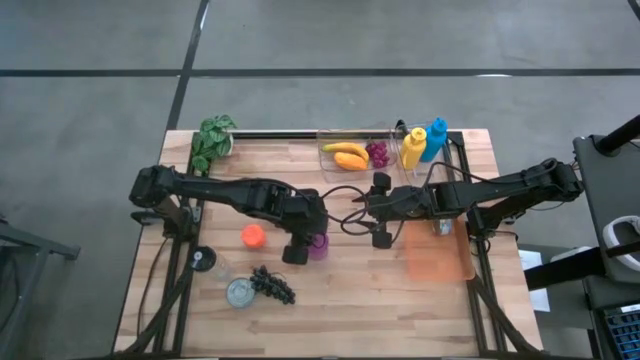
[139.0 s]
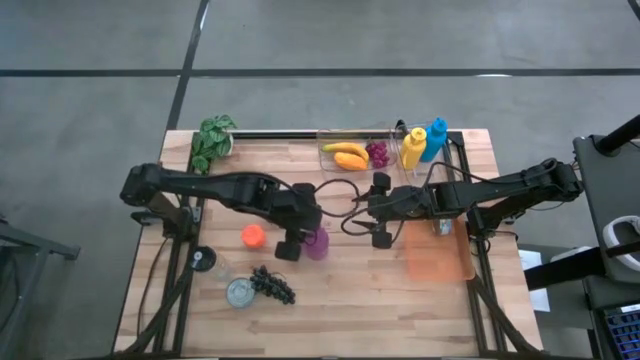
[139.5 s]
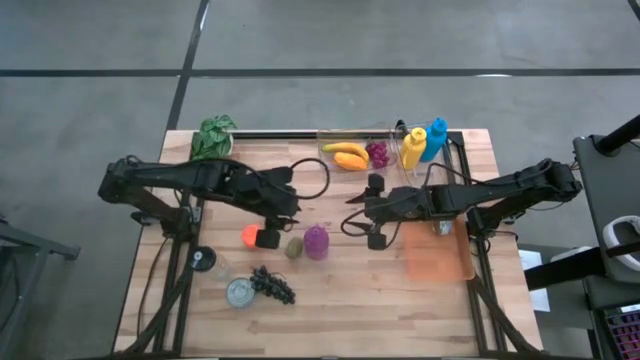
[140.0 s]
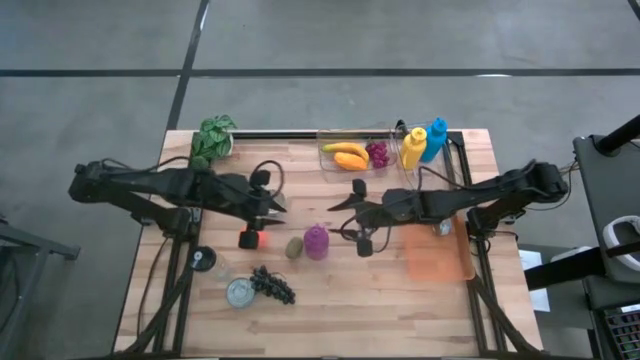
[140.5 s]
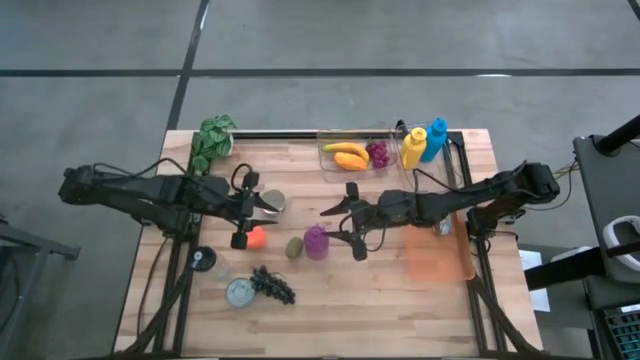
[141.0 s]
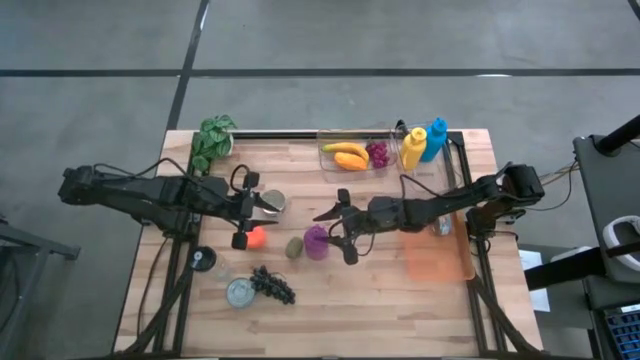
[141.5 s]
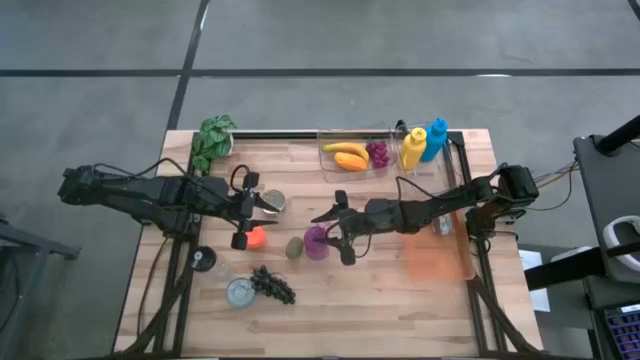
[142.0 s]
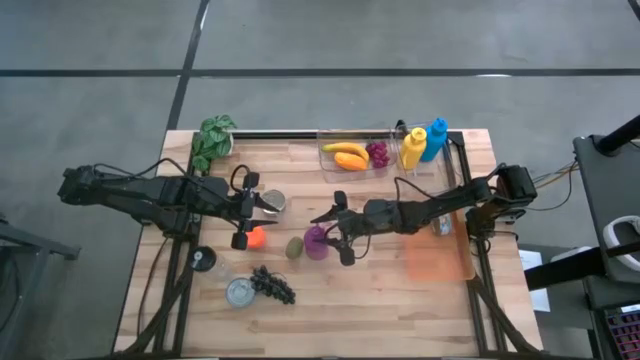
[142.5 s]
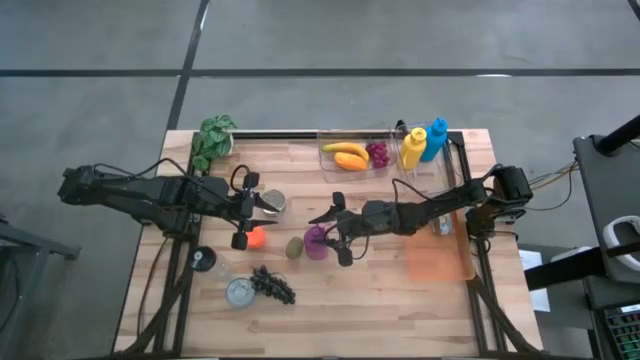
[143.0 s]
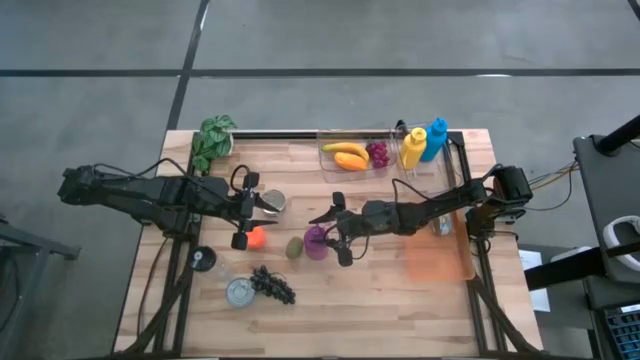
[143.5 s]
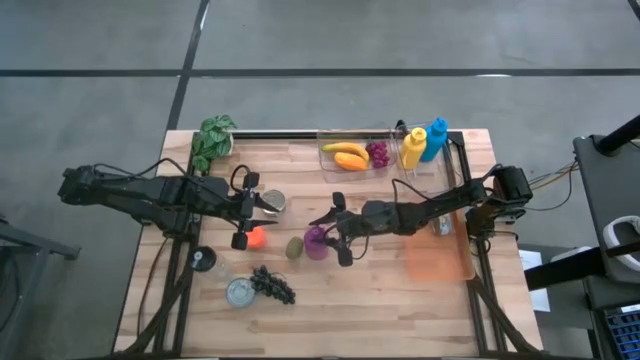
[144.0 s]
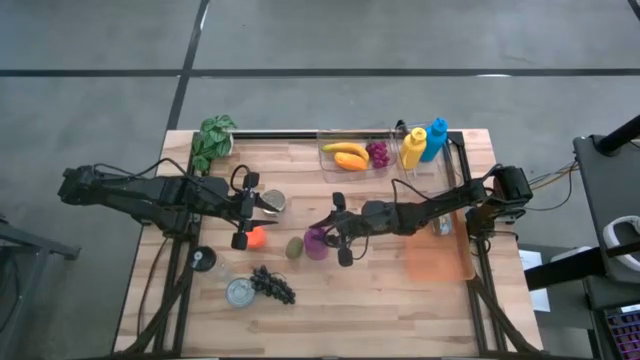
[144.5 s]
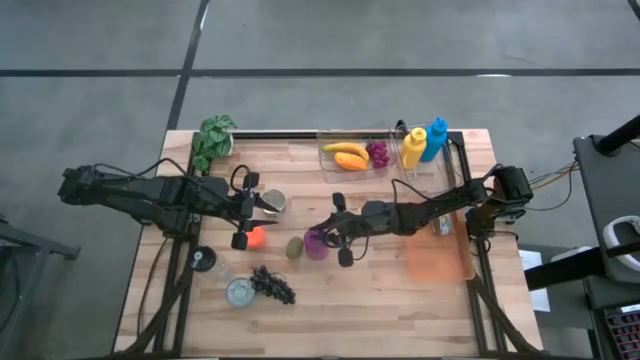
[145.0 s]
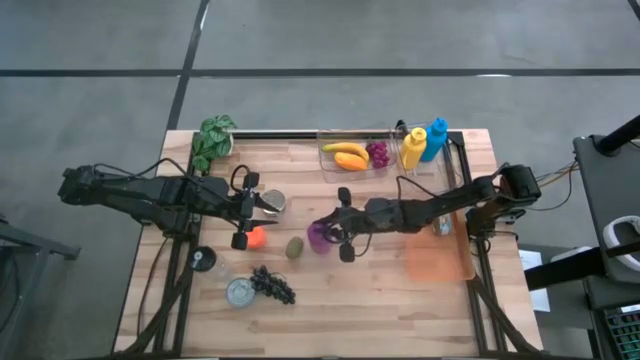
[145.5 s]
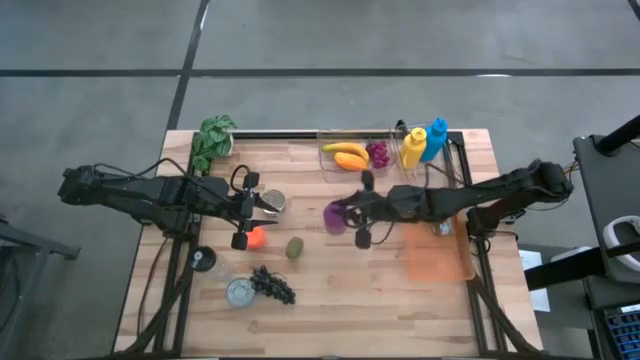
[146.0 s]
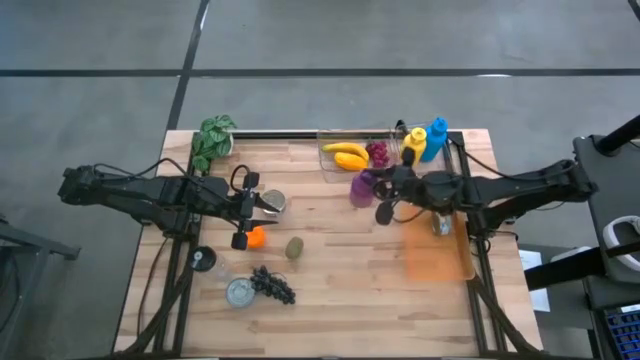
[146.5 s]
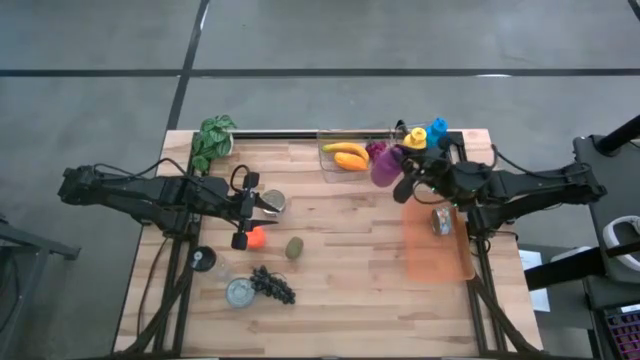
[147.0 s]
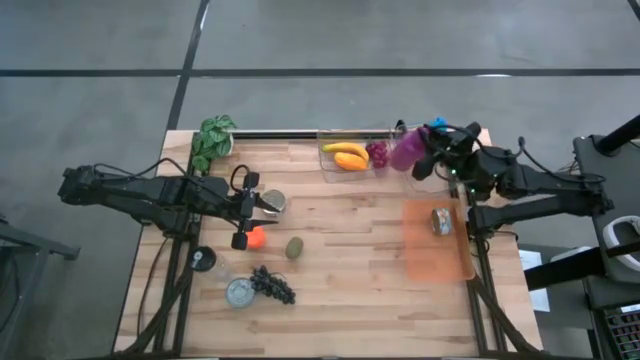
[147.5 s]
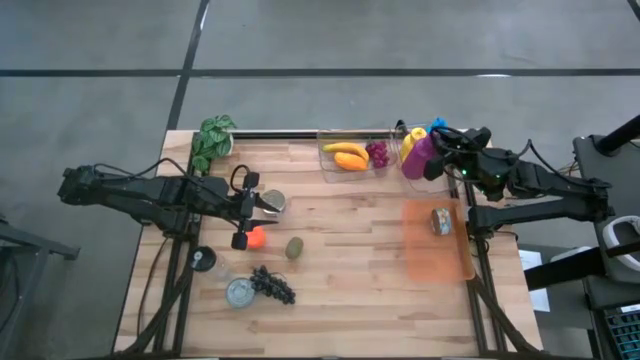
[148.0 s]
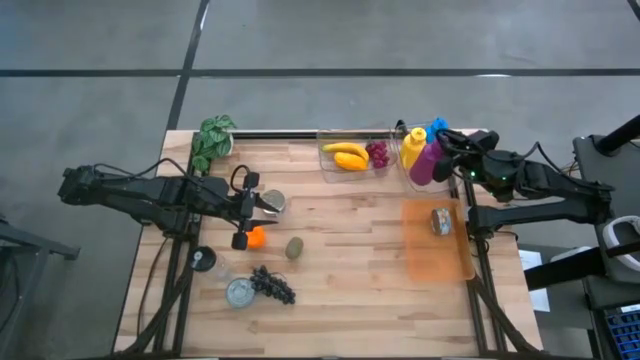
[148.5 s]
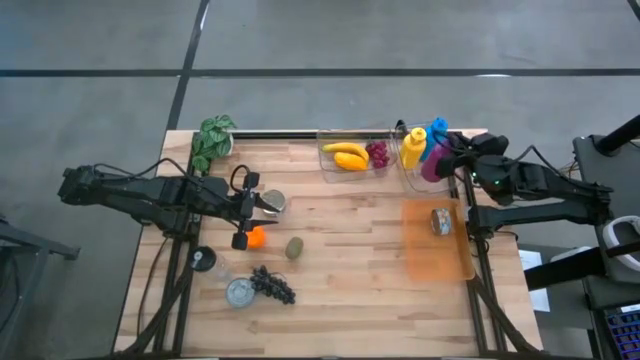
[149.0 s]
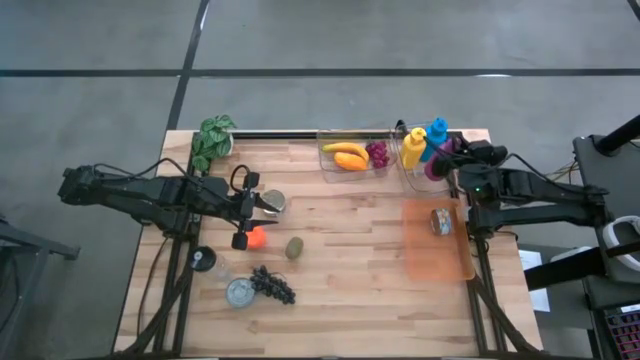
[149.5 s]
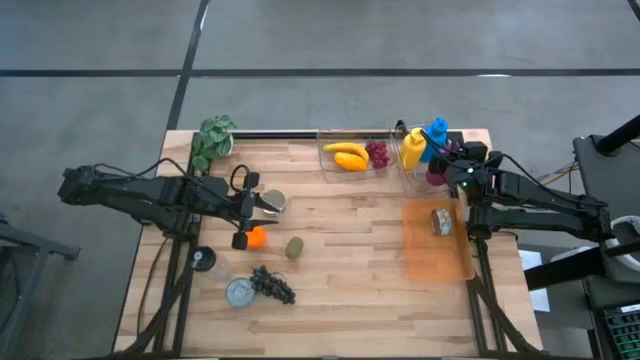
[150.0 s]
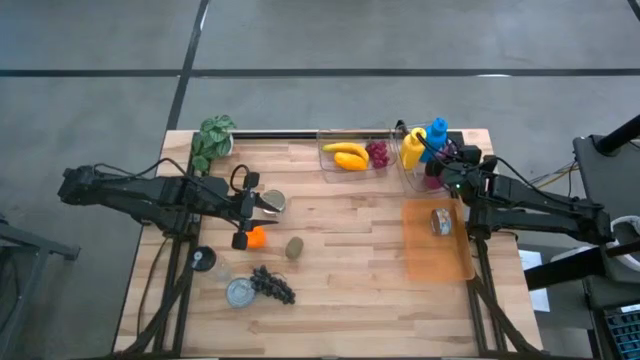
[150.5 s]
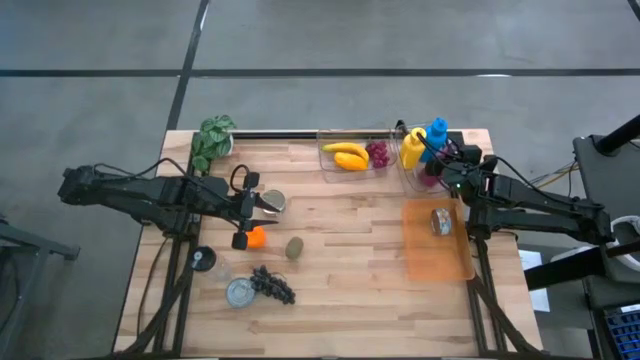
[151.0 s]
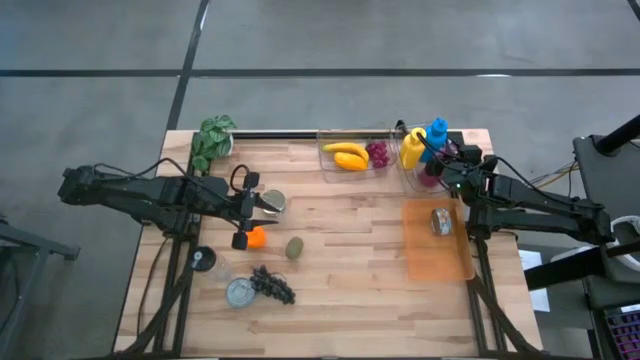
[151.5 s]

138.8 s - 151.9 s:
Task: Pick & Place Food Item
Put the violet water bottle into the right transparent bin

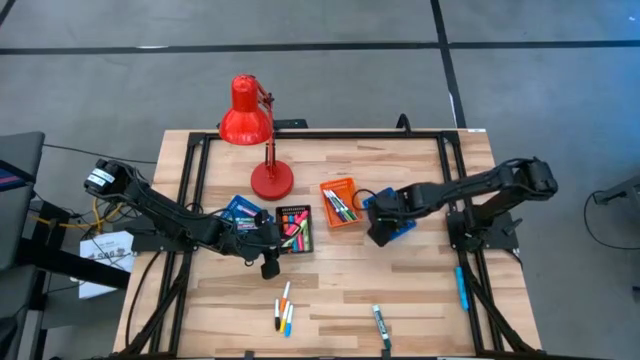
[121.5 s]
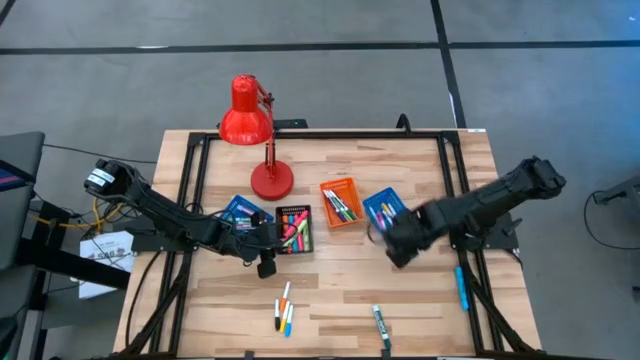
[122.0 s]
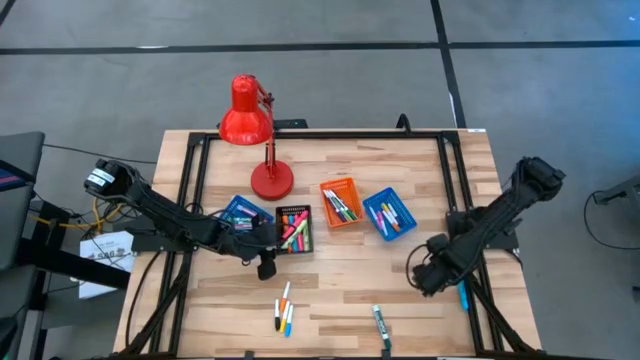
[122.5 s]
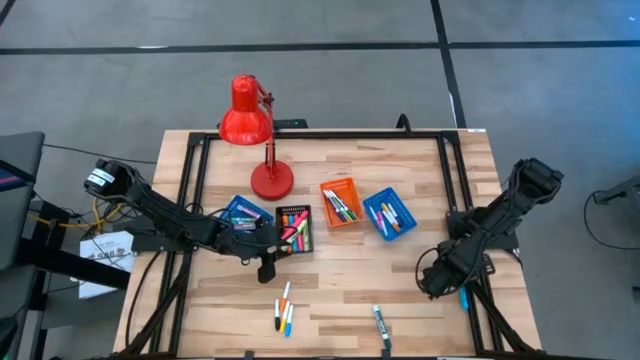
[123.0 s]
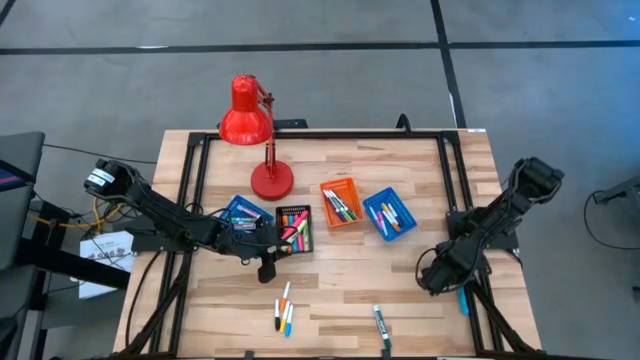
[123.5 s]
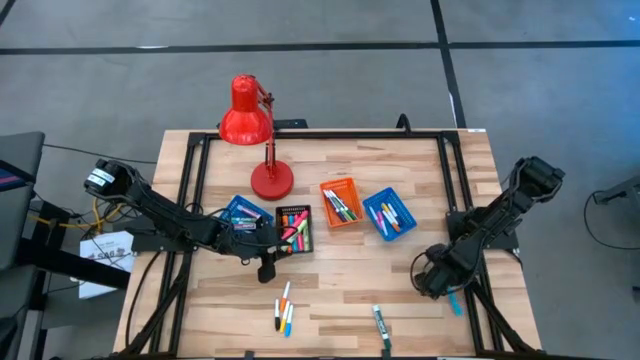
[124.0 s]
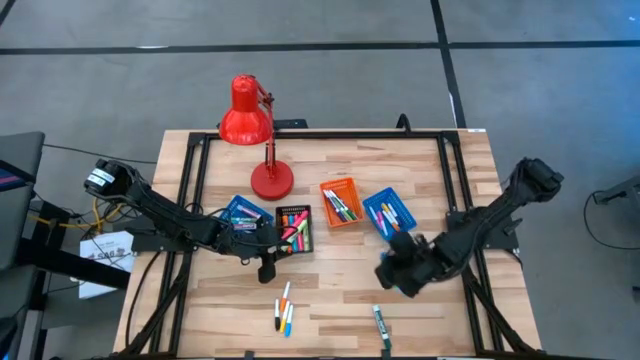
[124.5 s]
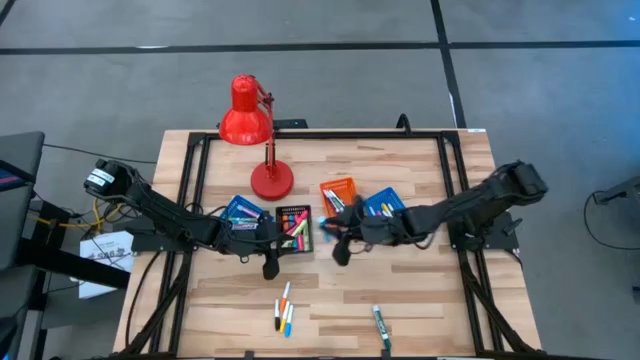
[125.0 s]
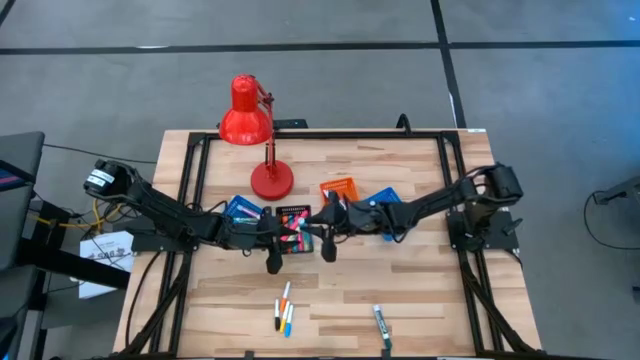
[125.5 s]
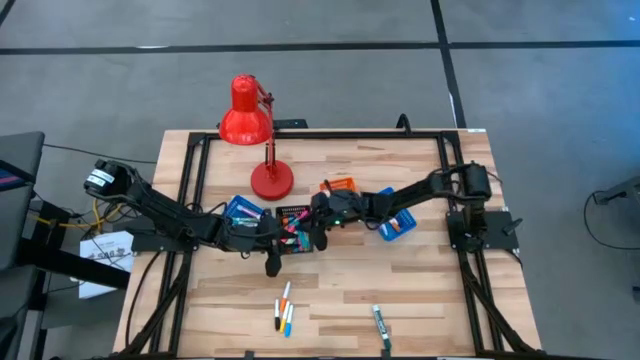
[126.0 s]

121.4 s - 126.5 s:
Task: Pick & Place Markers
Put the large blue highlighter pen into the black basket
